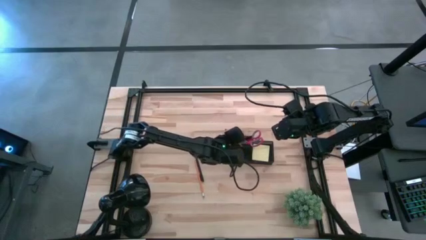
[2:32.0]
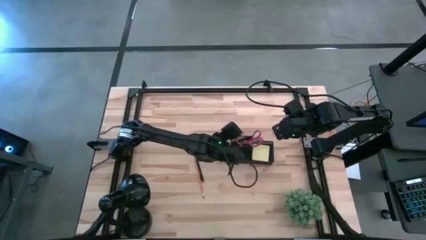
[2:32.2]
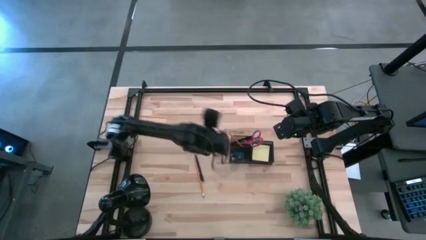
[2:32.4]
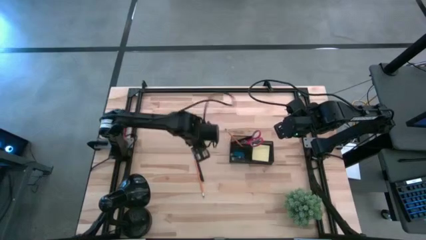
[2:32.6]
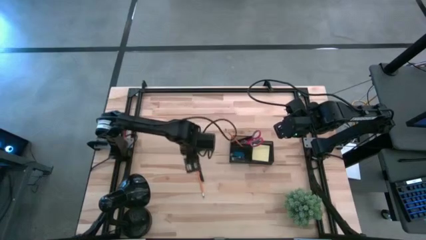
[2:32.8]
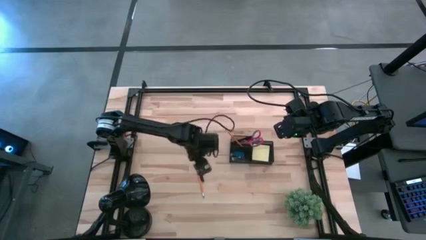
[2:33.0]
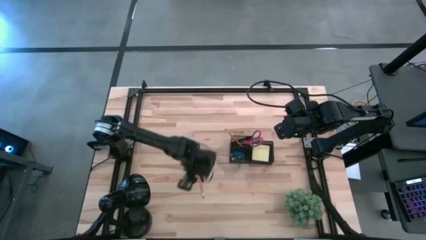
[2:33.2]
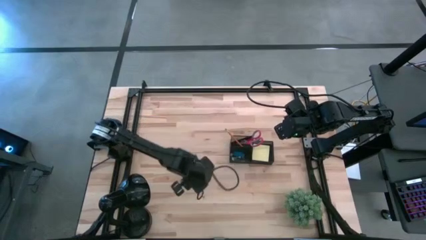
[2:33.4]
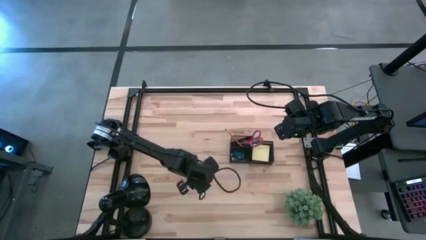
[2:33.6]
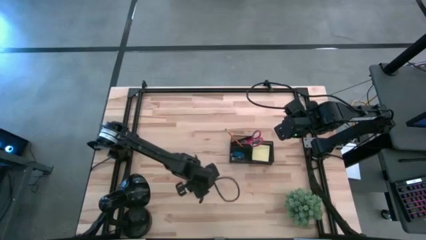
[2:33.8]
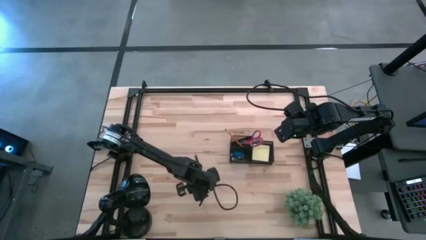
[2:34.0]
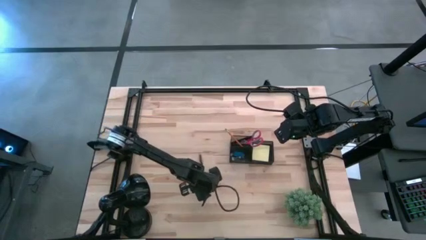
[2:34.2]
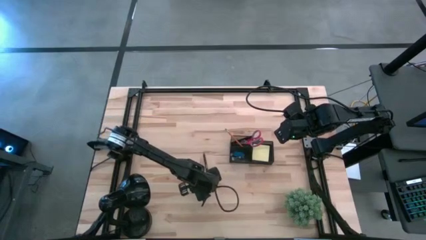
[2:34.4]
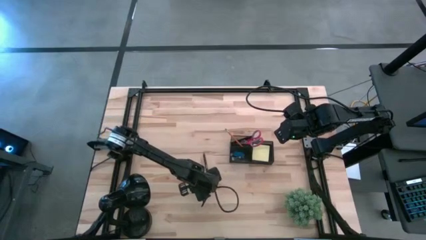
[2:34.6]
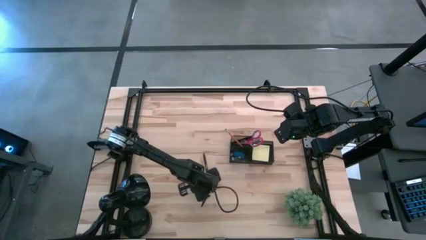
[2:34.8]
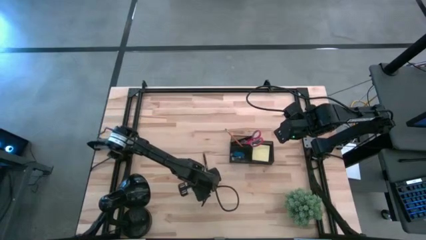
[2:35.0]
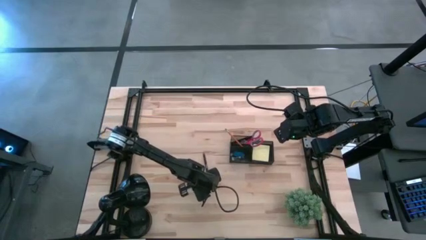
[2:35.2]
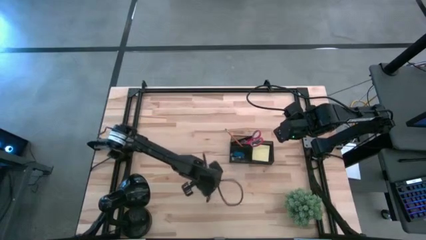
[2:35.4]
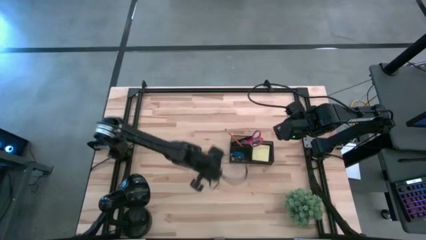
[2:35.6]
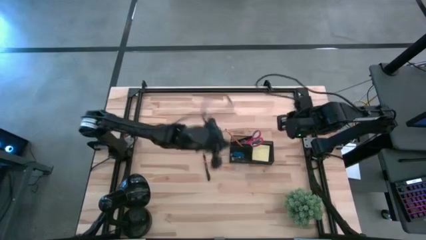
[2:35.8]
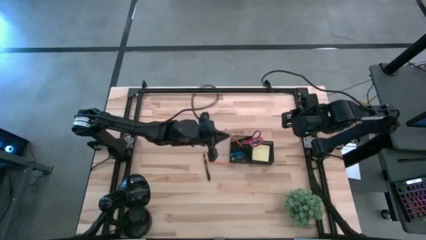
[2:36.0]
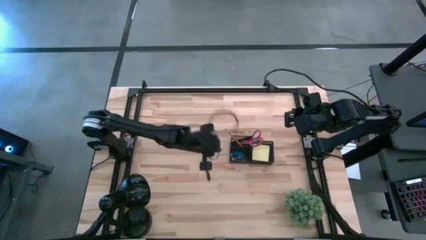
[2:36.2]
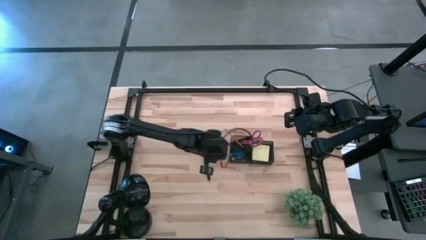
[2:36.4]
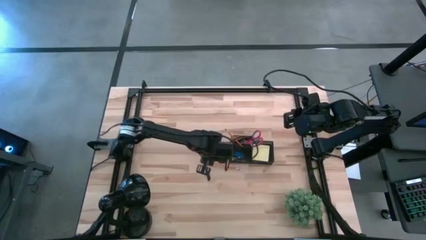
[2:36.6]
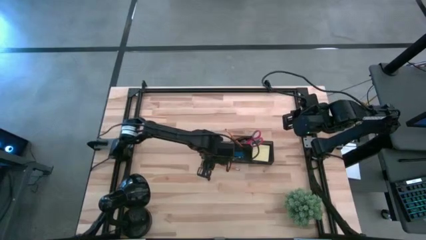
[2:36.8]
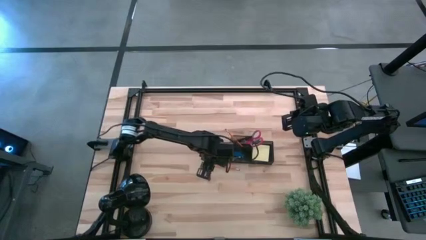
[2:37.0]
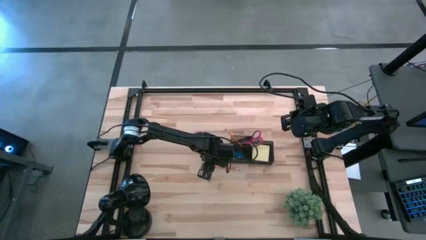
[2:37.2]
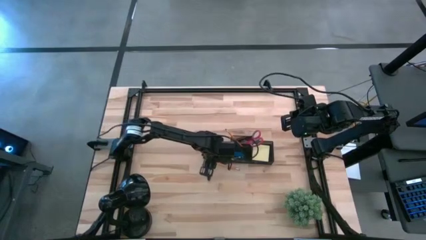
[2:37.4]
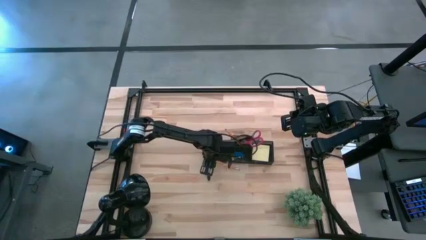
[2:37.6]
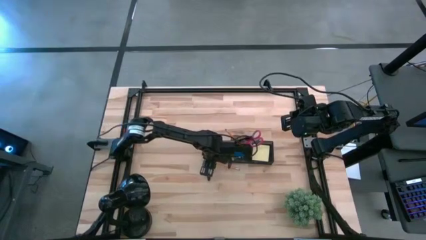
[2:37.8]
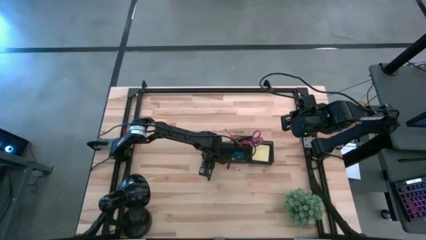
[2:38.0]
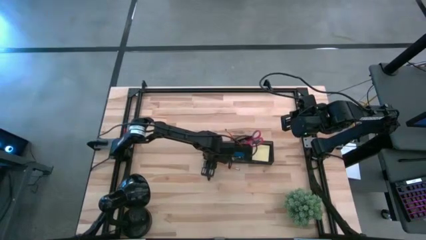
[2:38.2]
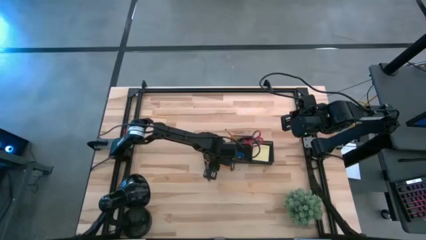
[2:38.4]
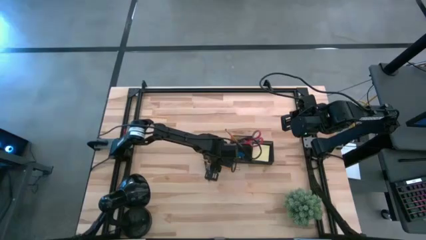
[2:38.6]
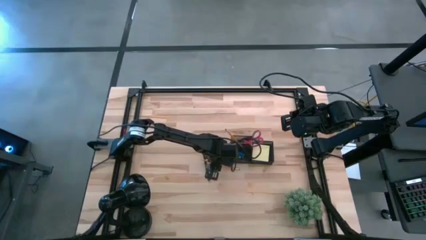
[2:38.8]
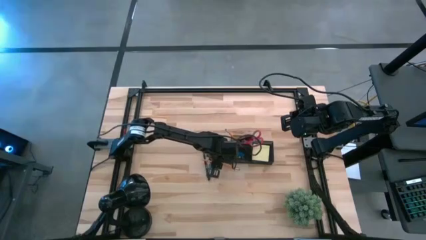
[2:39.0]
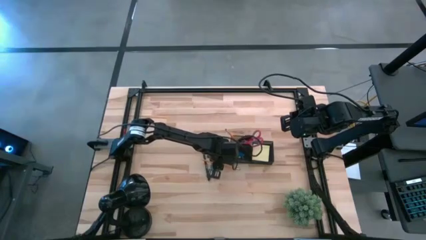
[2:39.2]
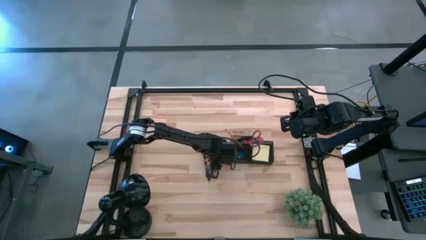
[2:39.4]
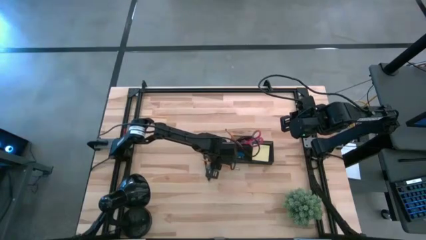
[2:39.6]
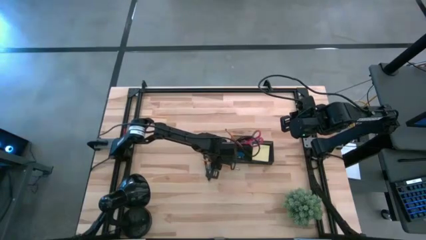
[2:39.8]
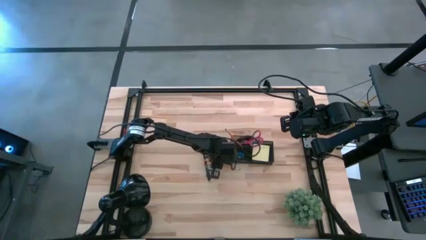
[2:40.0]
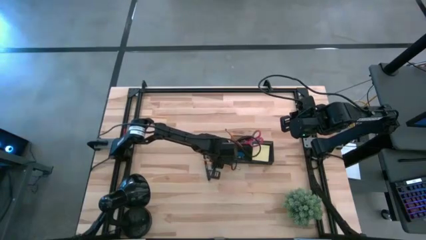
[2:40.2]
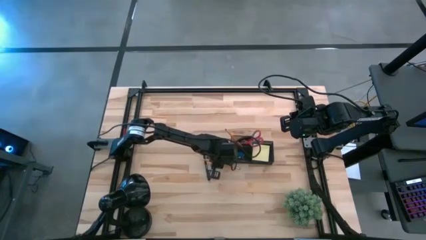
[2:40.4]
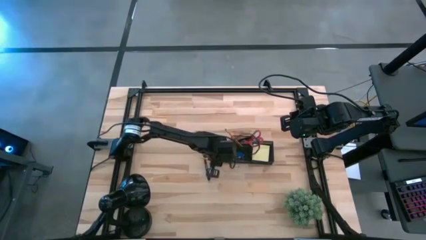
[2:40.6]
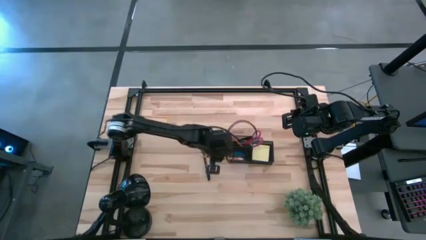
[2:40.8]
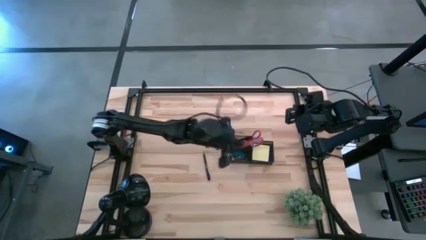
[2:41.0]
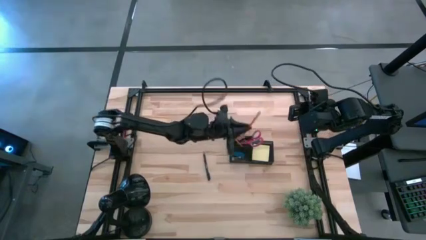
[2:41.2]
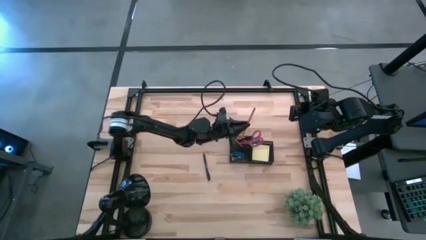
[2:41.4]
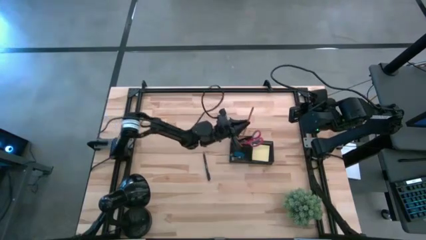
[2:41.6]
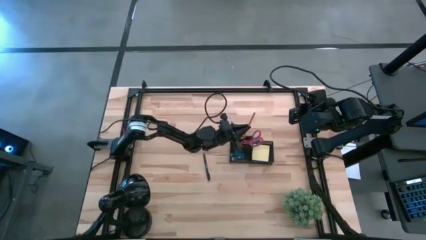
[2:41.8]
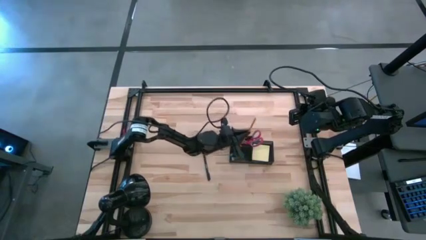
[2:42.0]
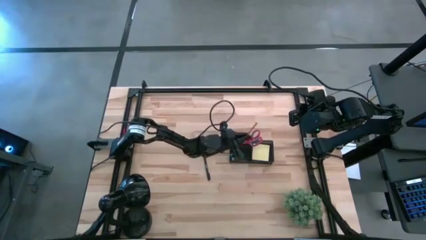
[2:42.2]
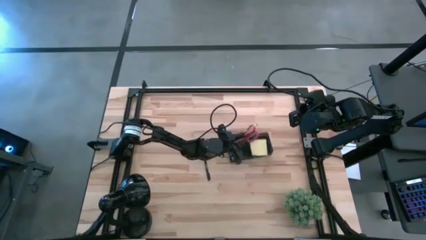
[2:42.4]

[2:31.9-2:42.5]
Task: Pick and place office supplies into organizer
Put the pencil into the desk organizer

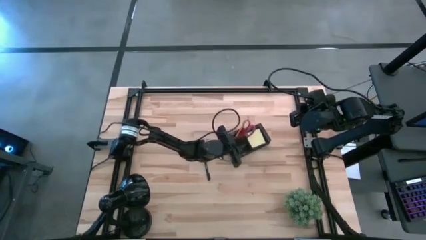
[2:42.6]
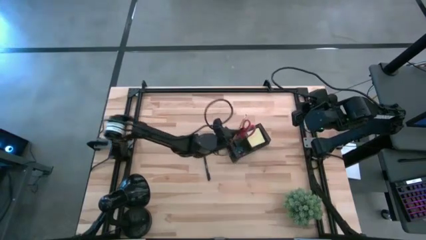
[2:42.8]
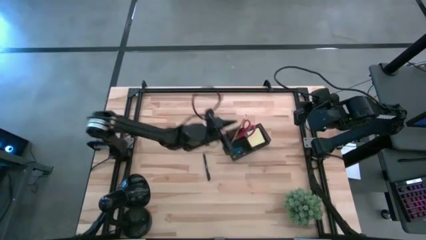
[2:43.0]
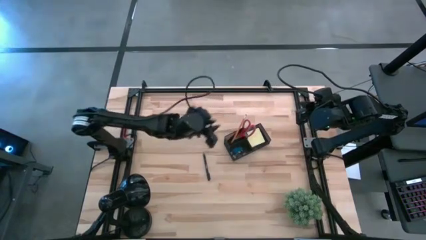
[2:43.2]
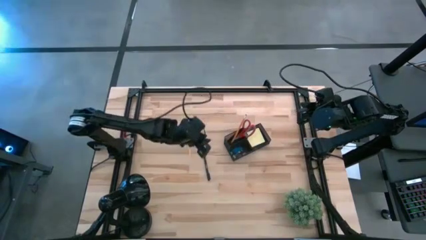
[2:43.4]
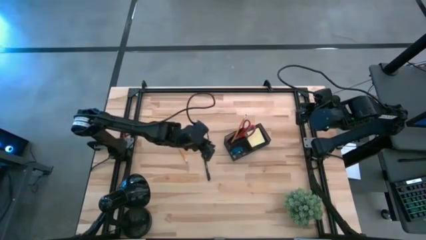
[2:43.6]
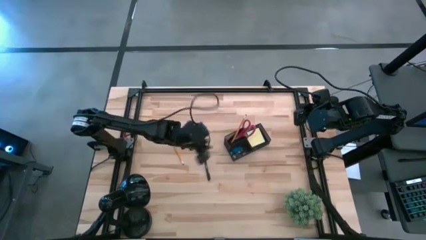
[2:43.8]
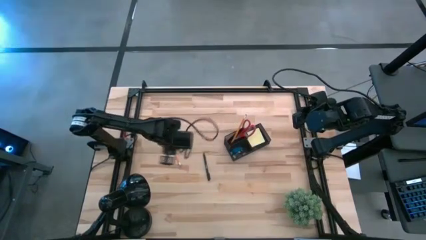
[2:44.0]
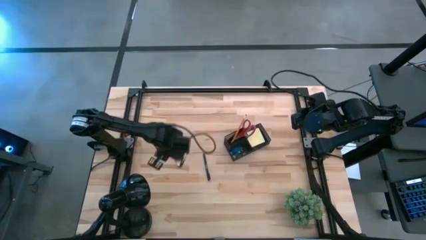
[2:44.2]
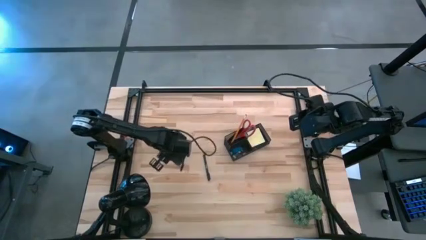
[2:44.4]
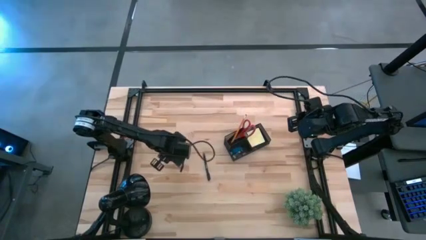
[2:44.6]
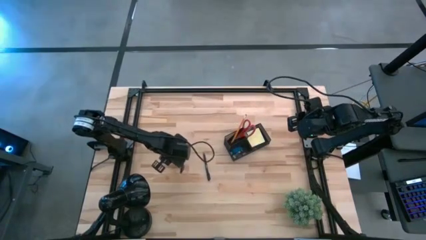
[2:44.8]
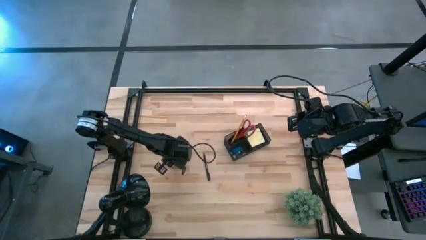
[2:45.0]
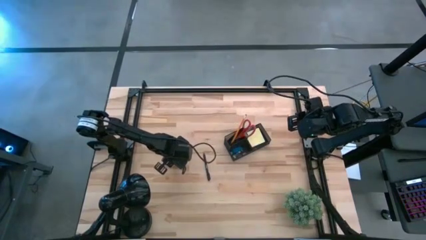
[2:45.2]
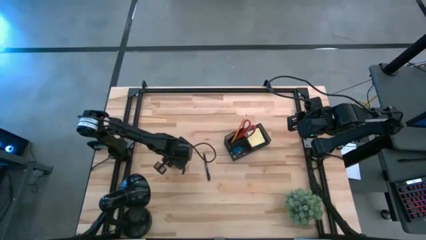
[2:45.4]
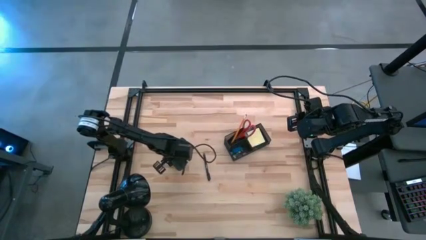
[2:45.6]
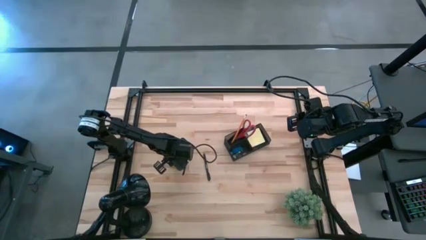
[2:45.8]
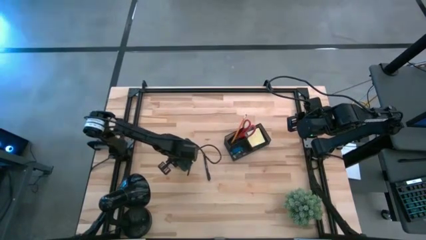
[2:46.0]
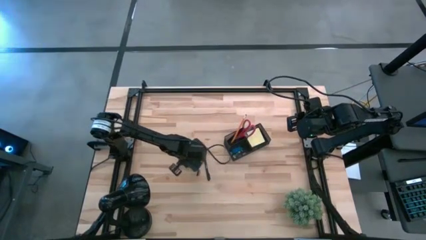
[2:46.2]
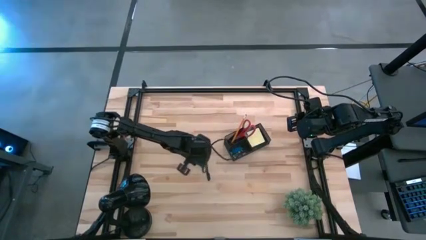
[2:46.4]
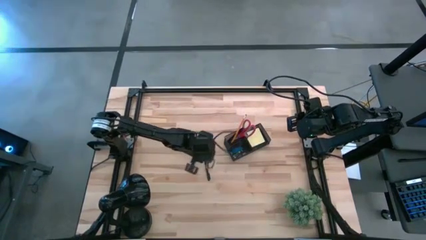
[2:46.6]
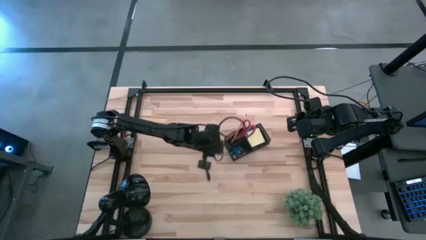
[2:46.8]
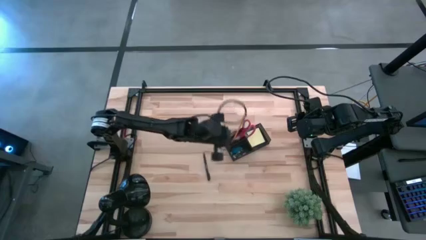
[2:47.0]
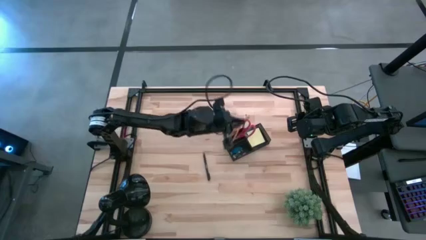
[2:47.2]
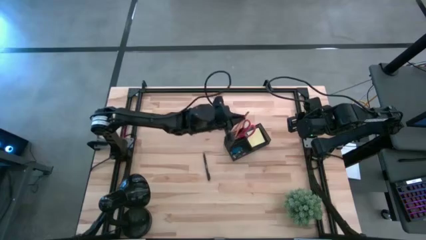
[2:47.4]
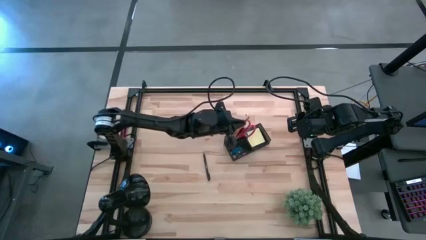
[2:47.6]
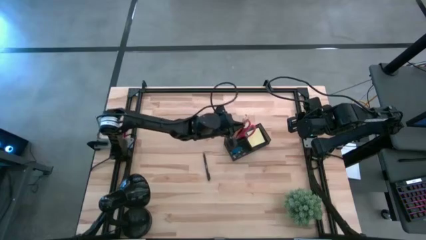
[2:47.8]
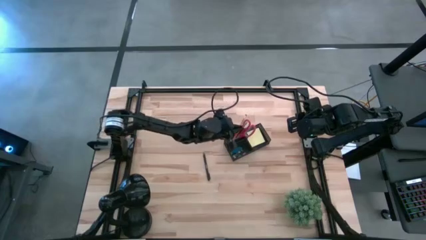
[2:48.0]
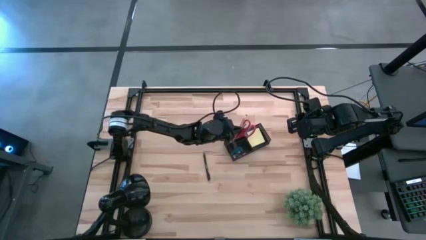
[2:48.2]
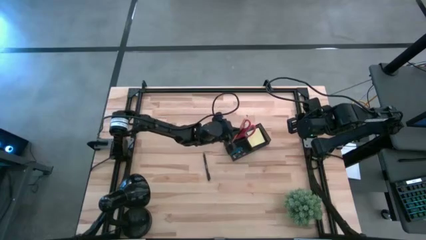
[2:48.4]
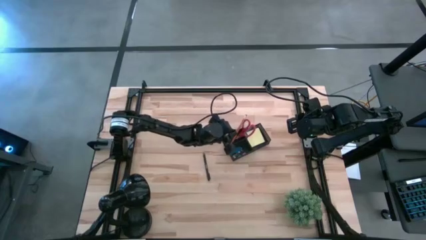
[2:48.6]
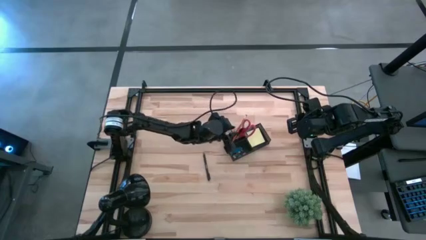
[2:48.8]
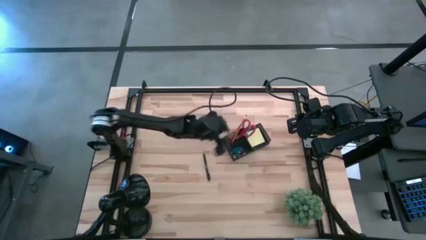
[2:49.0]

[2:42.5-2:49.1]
Put the pencil into the desk organizer
